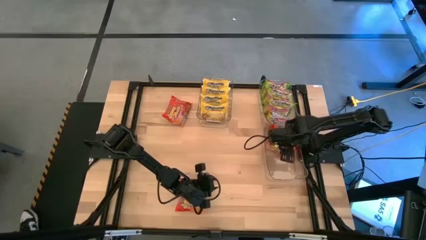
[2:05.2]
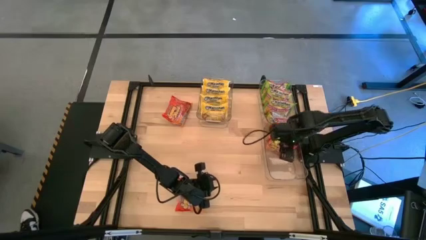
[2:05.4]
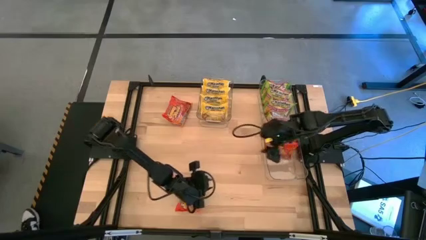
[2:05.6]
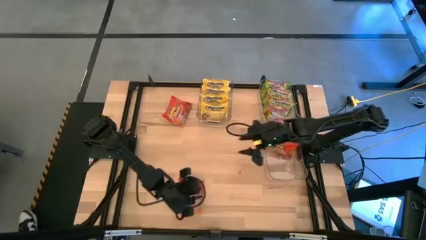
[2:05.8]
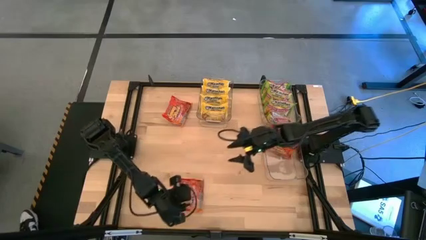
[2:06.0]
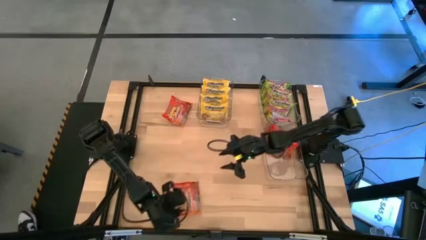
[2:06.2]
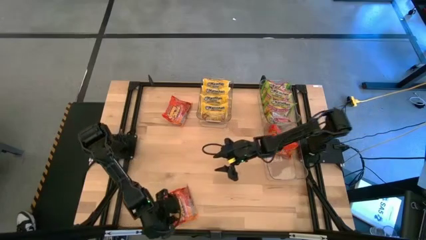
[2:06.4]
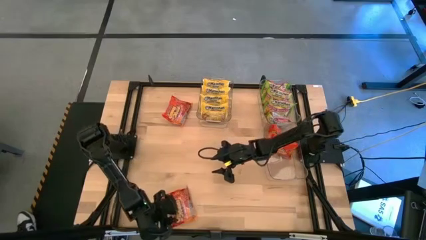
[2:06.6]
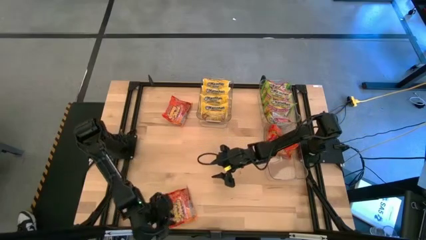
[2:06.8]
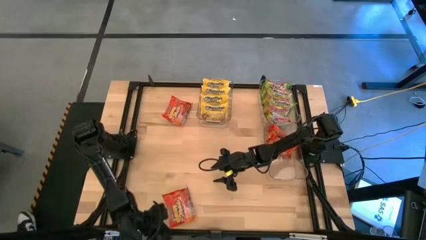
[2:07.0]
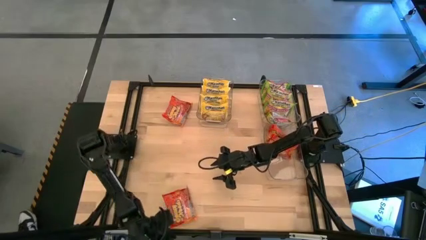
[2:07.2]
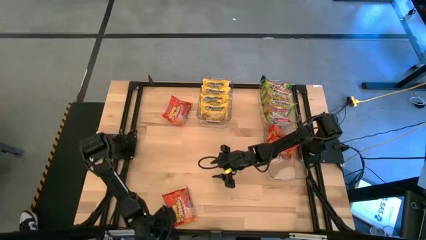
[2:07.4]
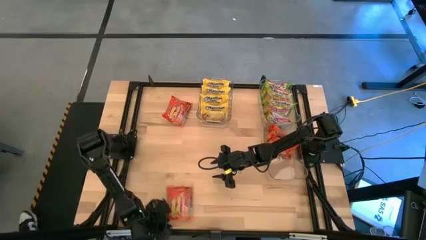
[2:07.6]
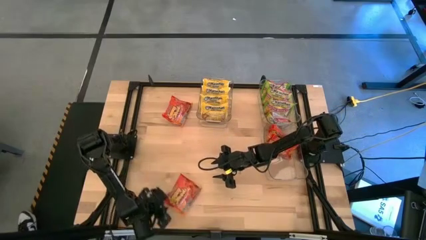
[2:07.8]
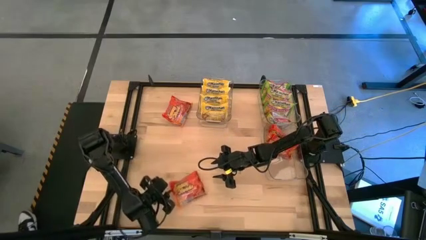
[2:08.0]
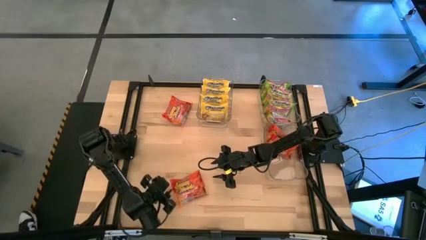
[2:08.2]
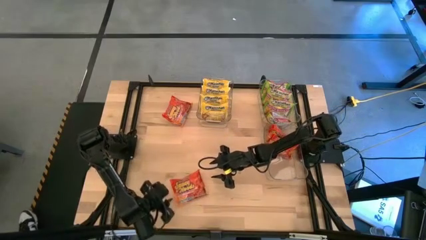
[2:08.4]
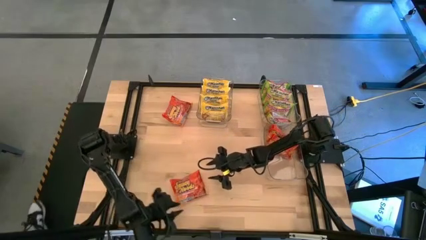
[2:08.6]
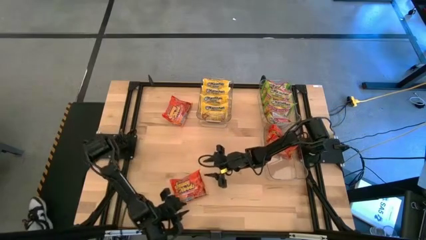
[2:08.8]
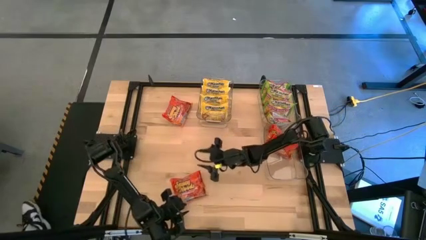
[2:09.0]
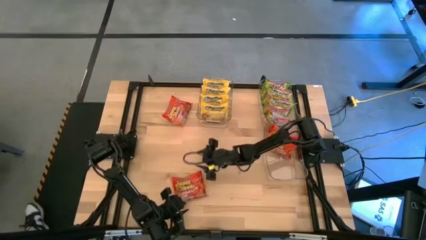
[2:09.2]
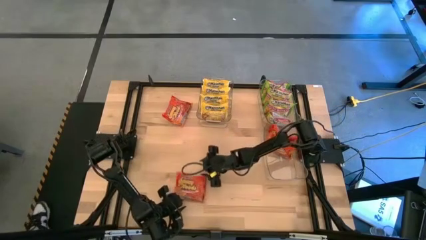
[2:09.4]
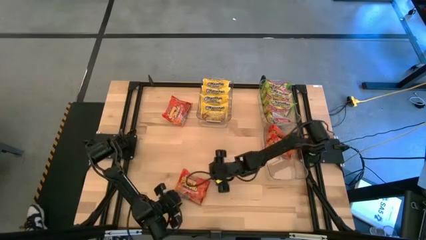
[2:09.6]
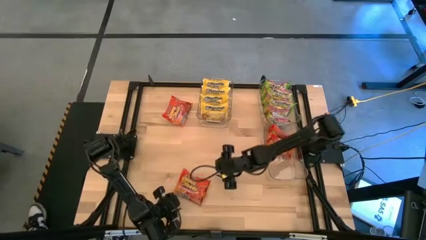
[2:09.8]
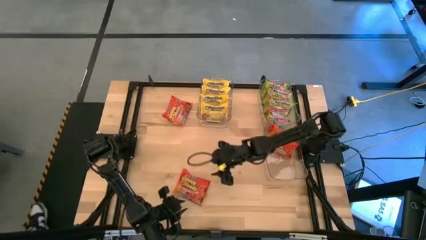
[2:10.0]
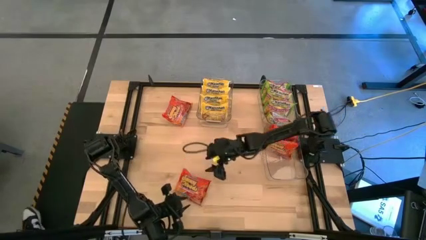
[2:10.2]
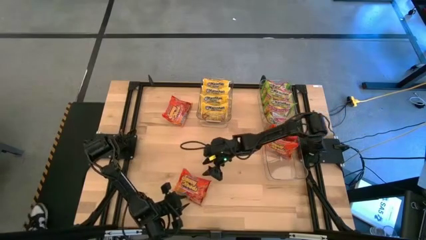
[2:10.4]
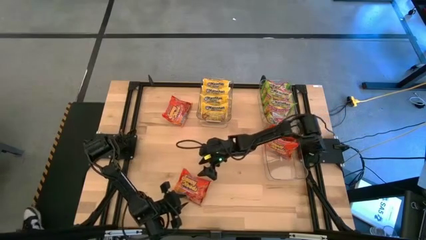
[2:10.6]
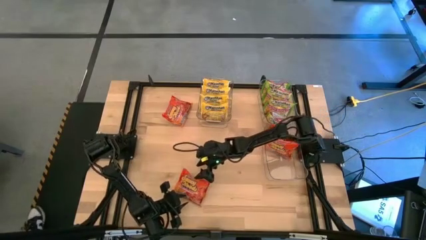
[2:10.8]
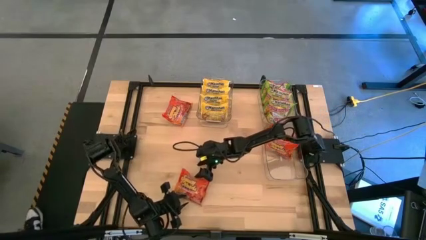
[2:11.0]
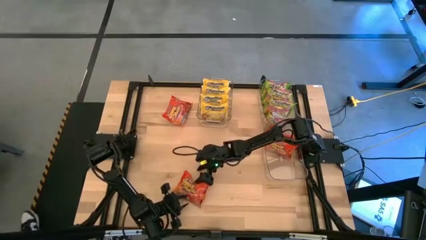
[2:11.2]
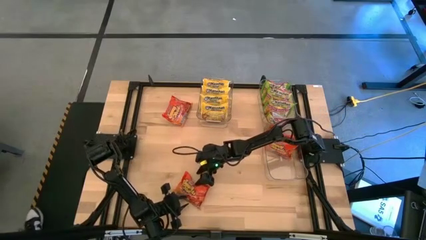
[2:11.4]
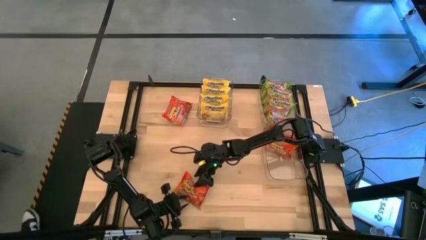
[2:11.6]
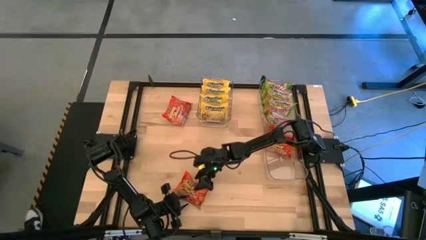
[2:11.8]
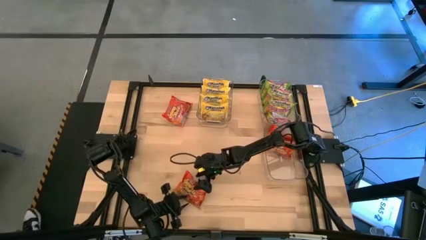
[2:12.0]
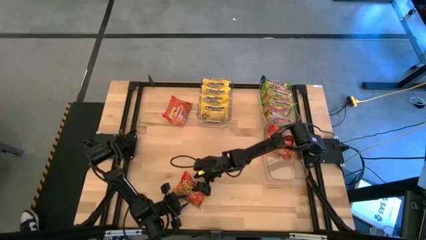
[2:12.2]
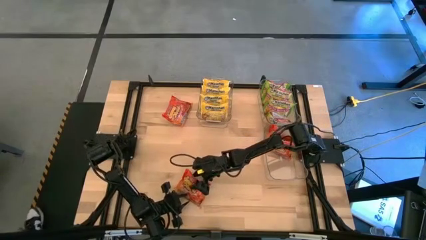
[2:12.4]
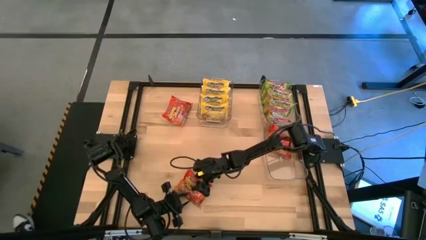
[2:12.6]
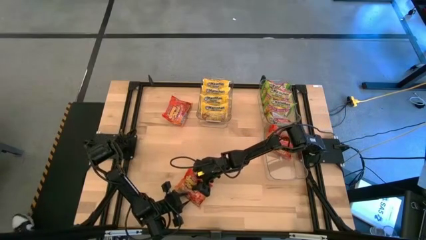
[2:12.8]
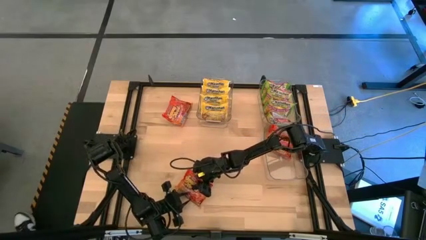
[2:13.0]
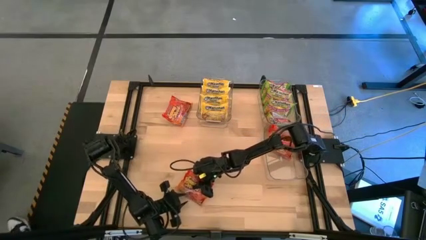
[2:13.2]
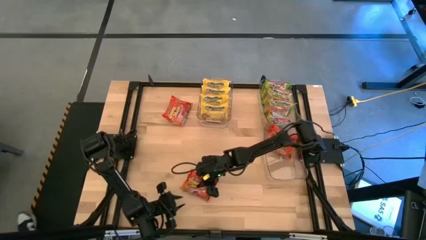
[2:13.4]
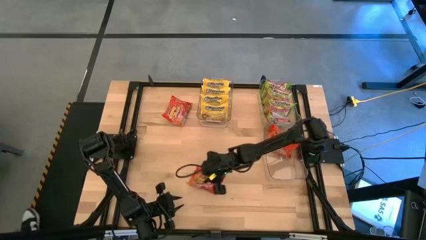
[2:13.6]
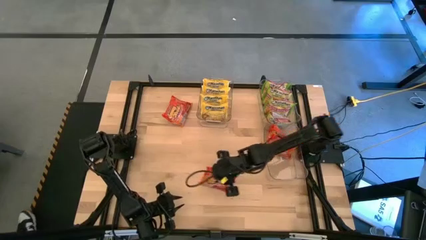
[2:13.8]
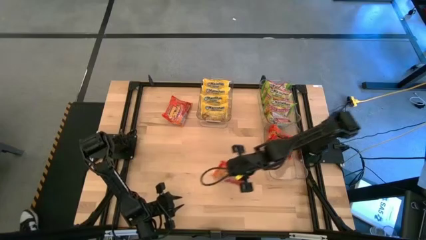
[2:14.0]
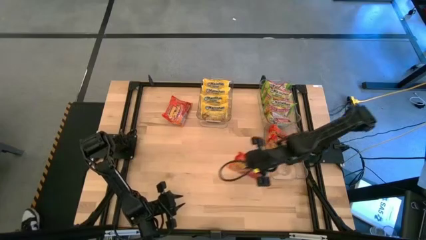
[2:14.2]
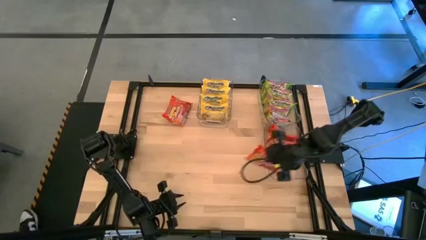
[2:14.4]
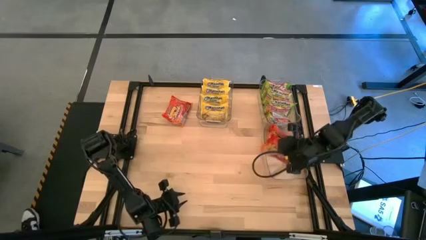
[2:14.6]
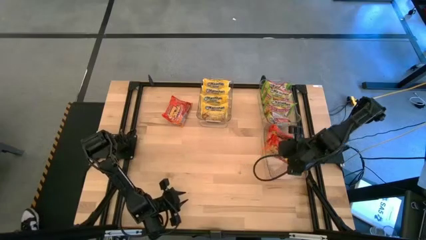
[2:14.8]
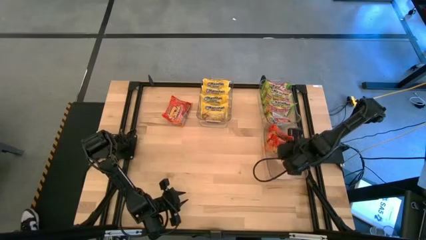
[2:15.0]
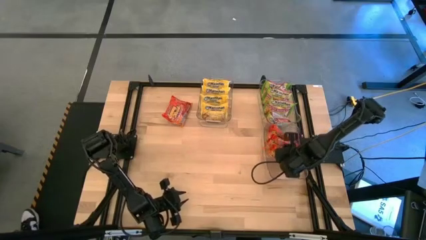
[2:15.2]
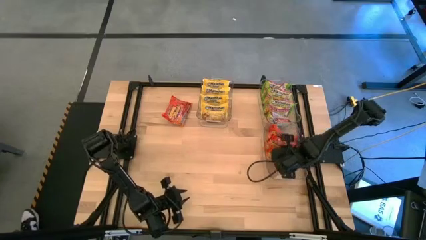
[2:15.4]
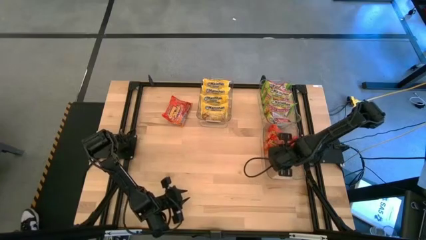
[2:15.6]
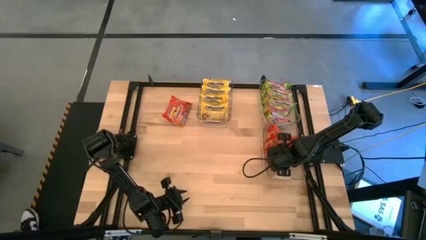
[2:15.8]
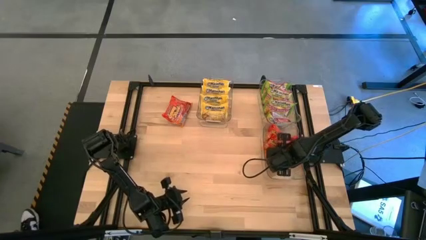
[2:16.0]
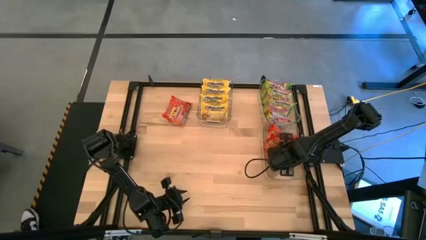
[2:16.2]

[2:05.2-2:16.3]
Task: Sort Maruchan noodles
Put the orange noodle pack into the bottom right transparent bin

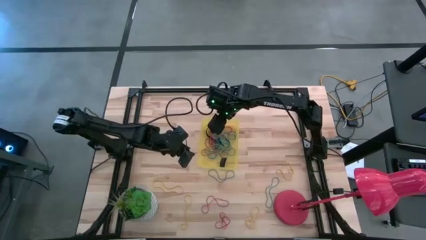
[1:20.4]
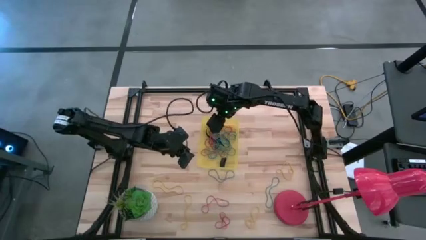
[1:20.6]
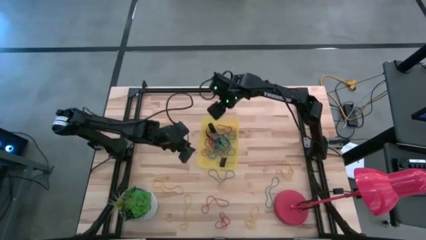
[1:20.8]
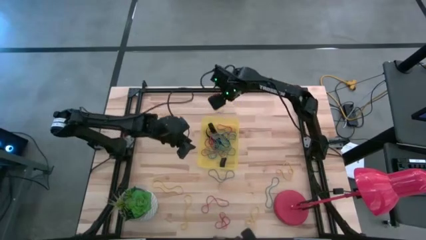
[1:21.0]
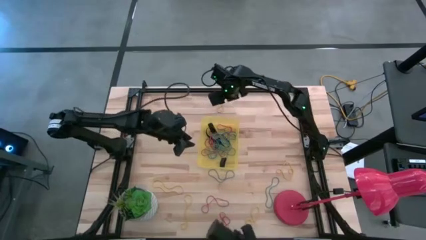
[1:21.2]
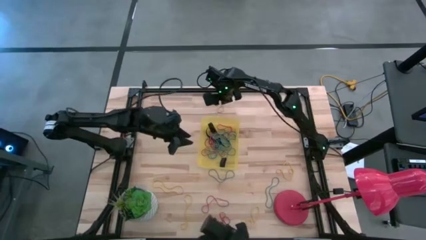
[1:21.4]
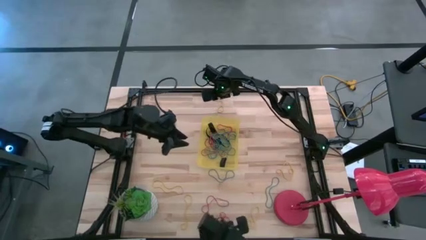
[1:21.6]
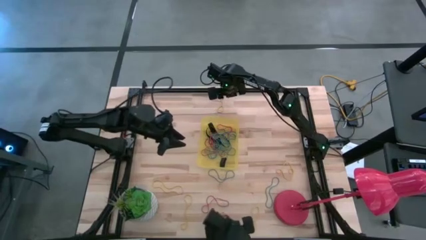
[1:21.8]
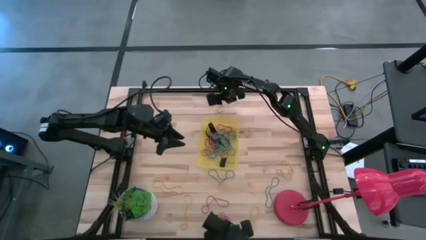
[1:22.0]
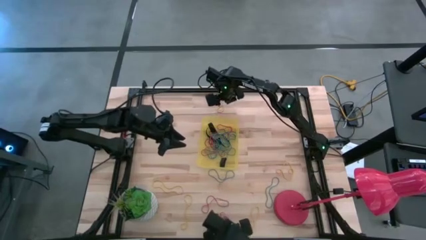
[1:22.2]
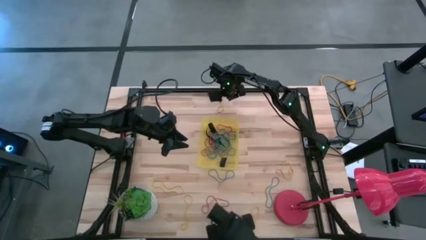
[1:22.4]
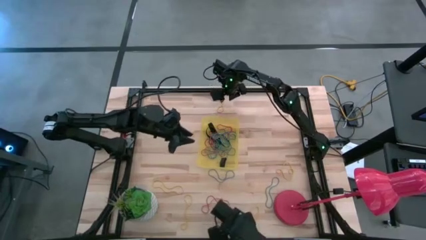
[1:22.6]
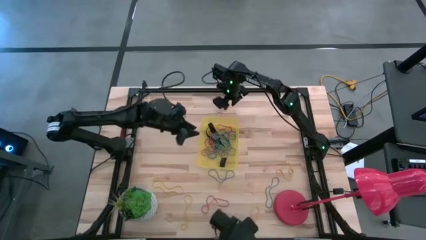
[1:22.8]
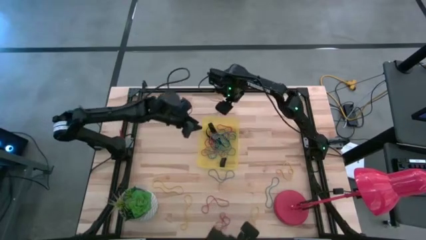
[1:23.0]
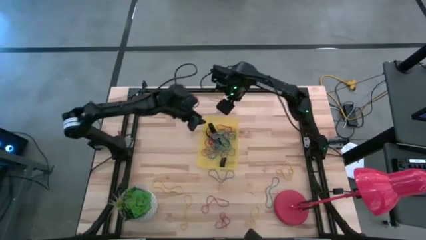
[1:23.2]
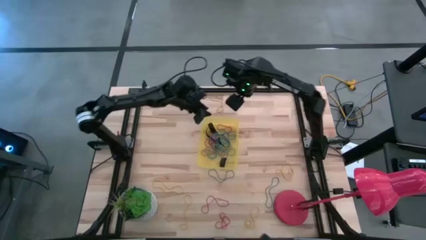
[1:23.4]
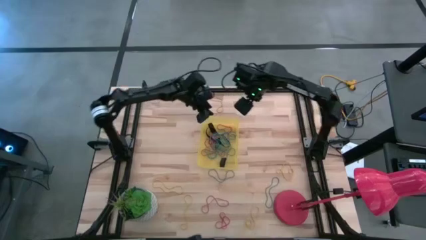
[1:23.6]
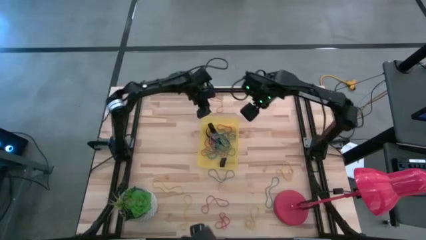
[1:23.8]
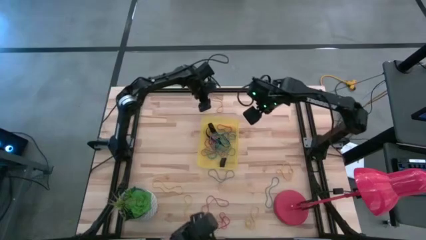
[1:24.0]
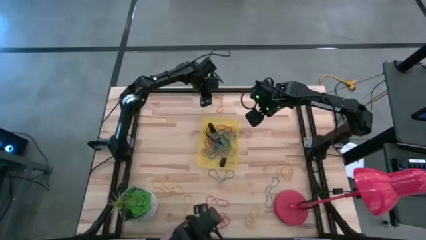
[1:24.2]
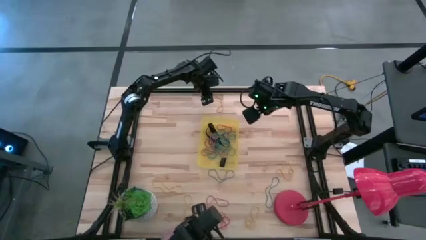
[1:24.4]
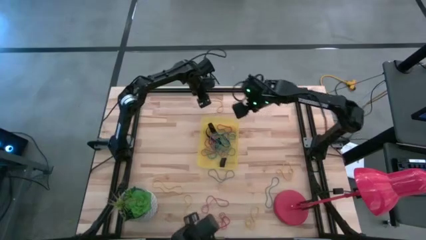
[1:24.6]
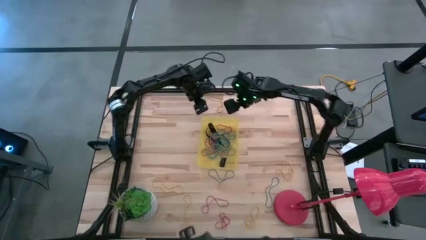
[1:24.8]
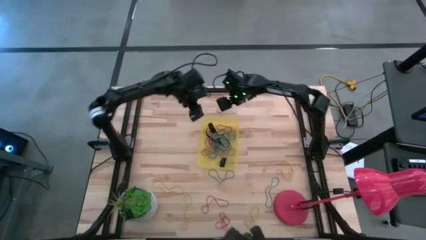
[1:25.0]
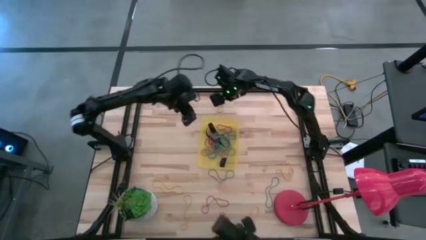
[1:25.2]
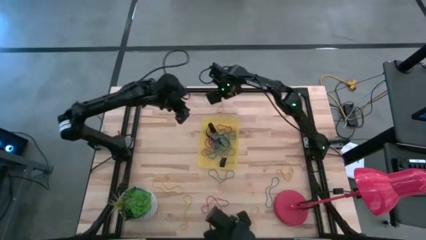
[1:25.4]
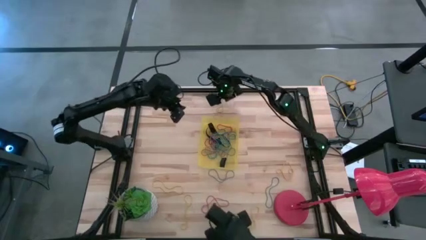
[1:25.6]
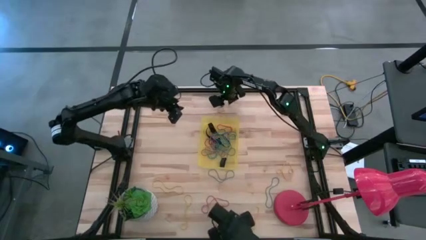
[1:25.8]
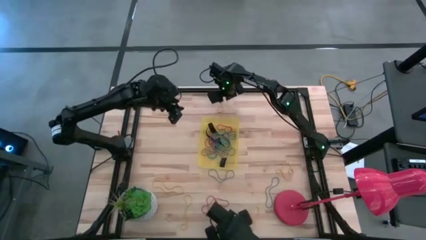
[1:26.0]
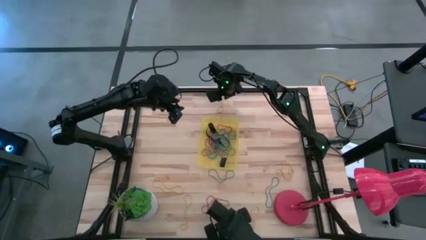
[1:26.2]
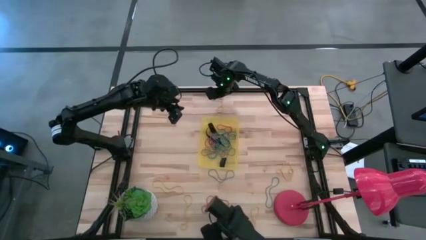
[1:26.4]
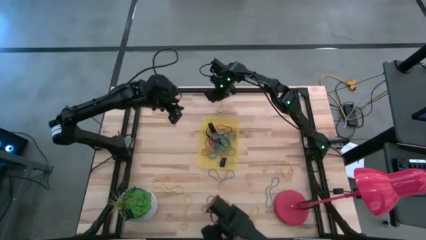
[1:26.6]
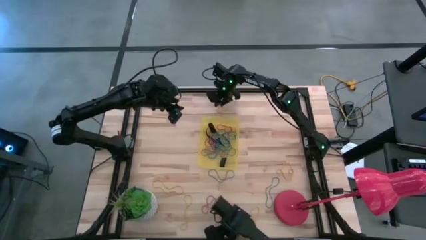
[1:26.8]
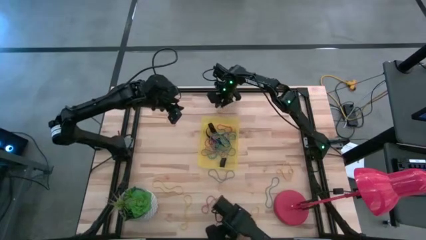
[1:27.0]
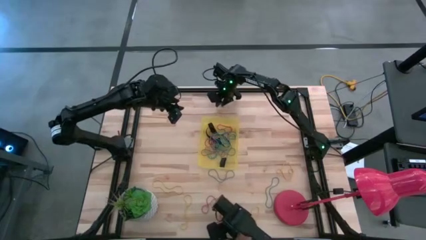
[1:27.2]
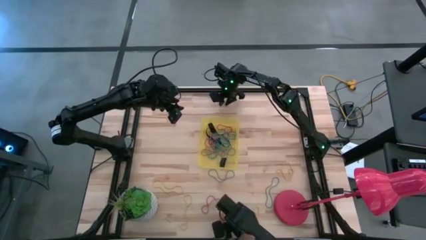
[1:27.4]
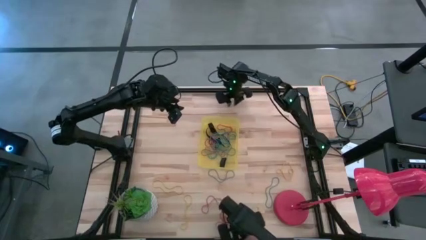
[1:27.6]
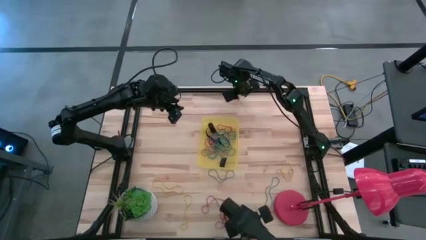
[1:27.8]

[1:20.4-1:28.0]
Task: Pick and place rubber bands into bin
Put the yellow rubber band into the yellow bin
